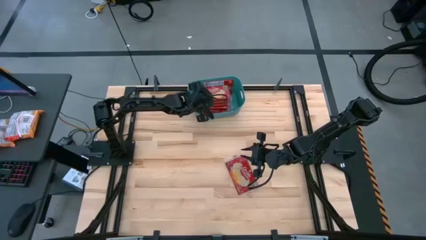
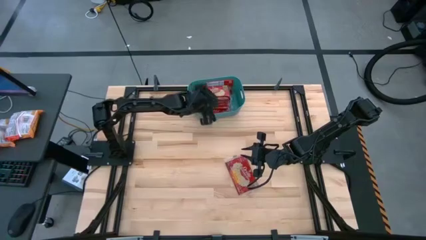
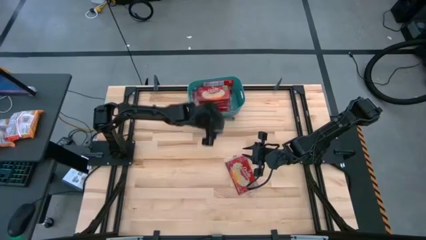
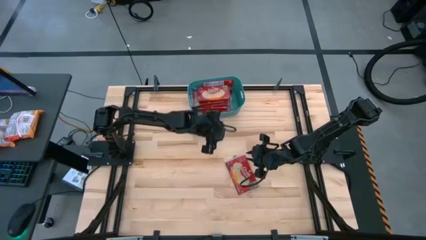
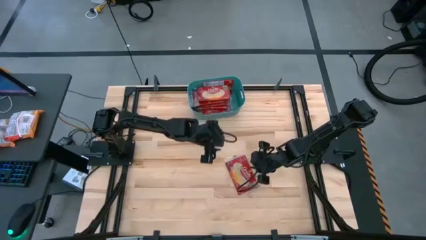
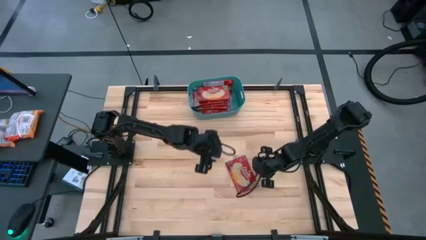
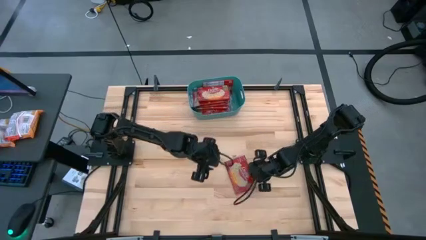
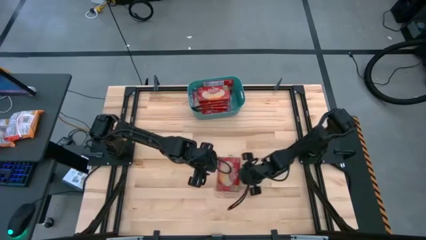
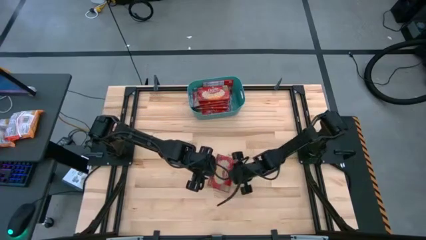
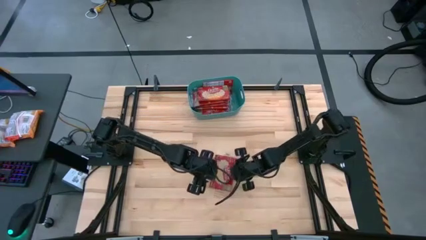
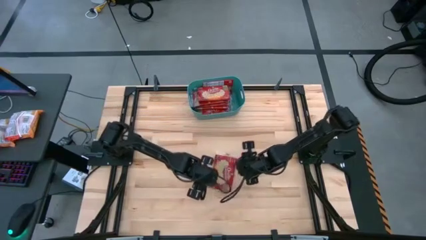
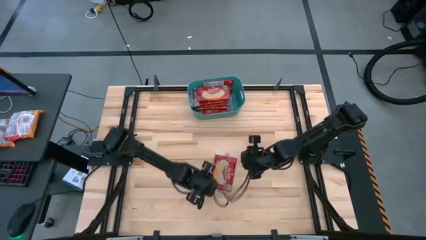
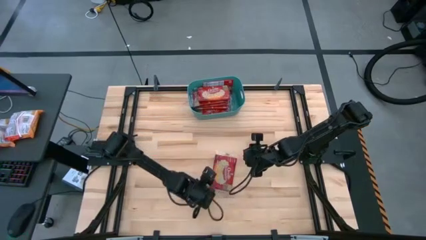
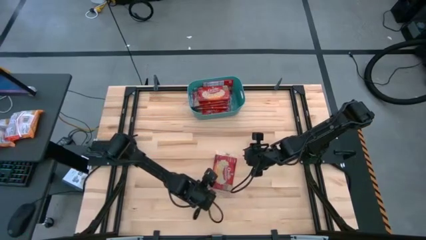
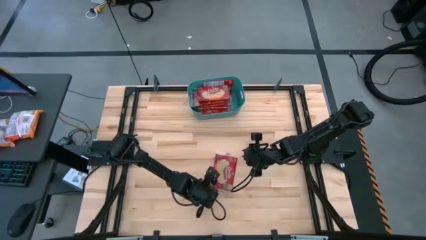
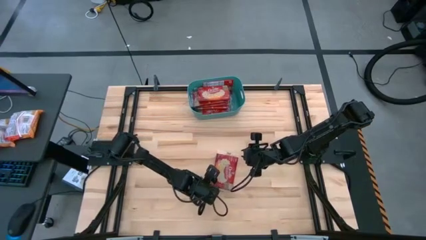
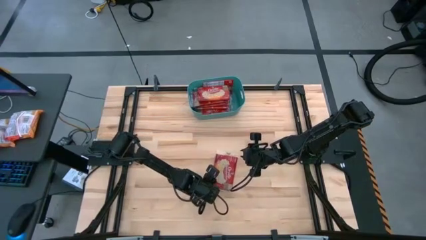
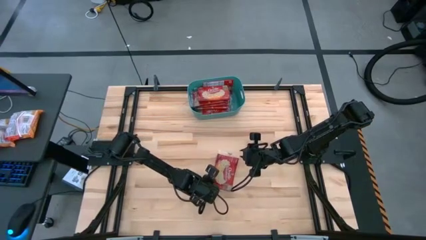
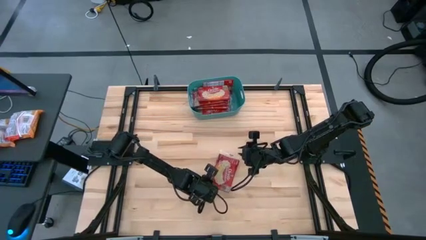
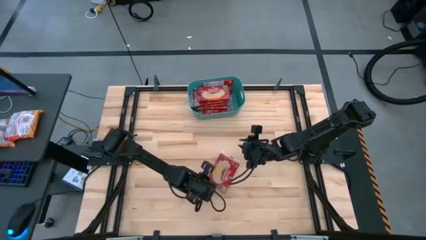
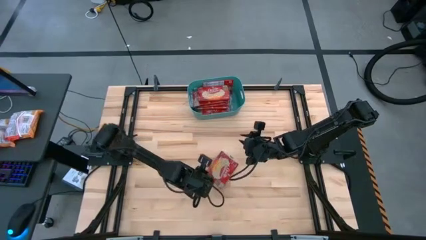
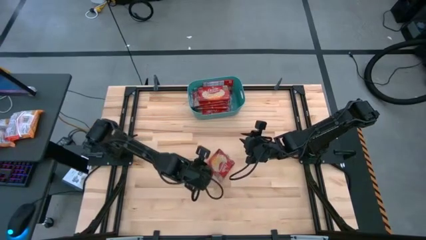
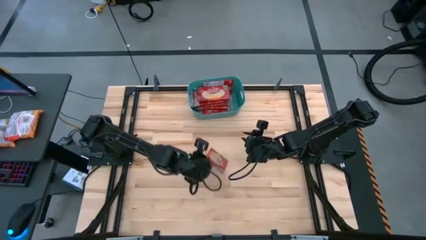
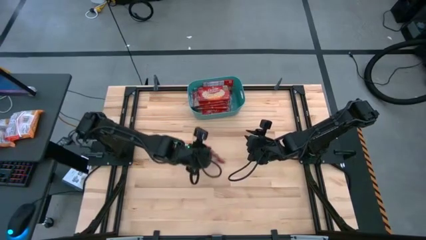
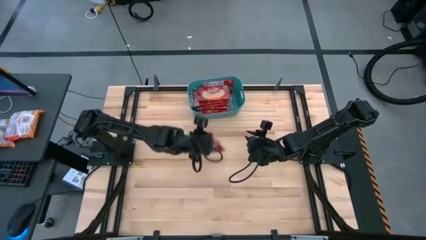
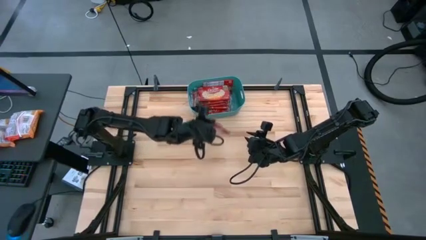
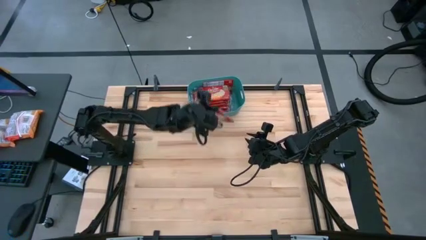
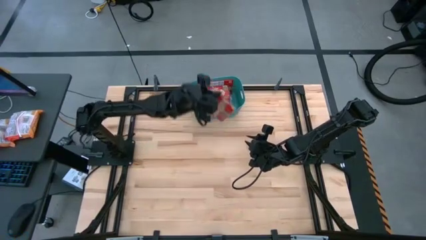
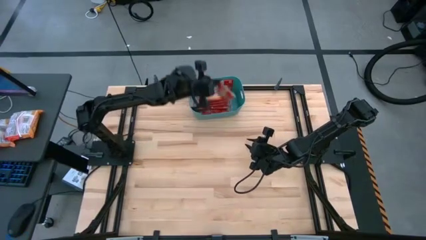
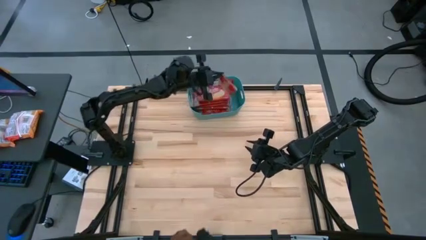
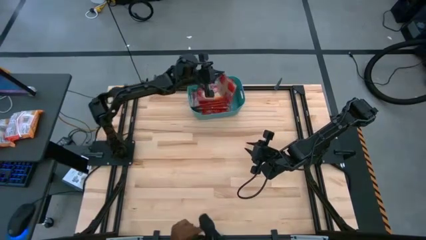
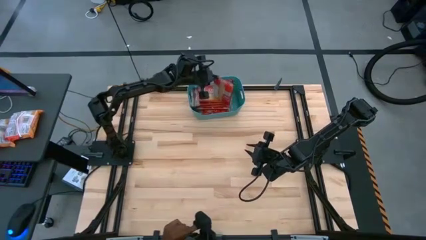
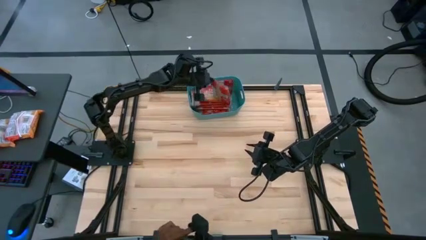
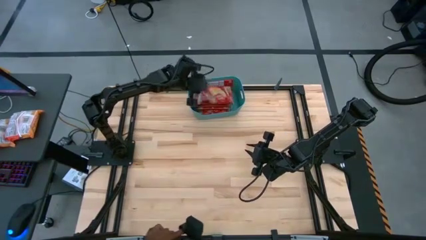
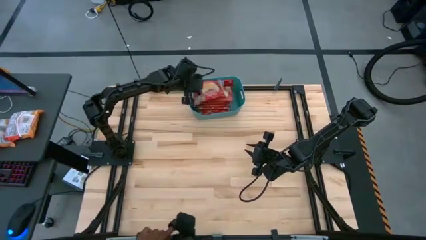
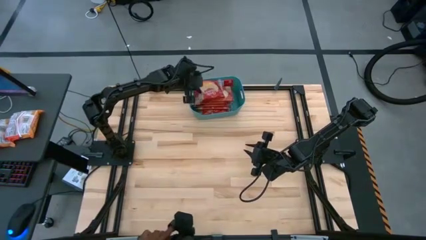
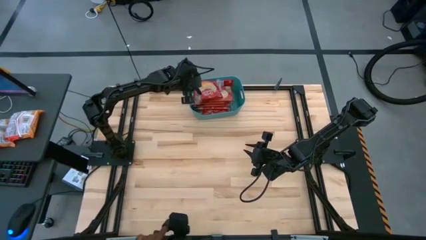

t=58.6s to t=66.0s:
Task: Sort popcorn bags into baskets
Put the red popcorn bag into the bin

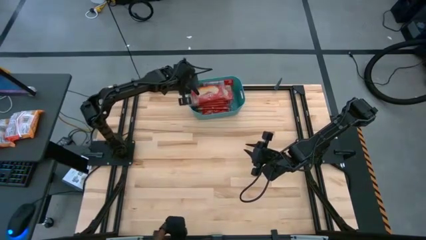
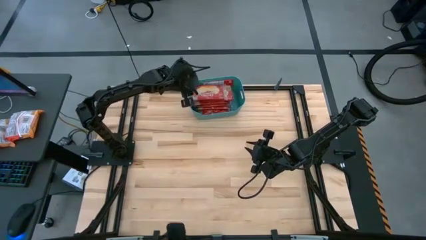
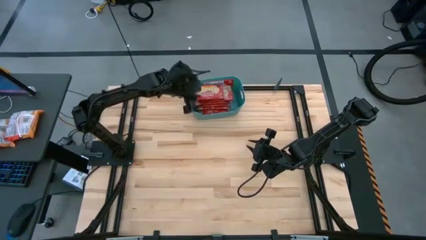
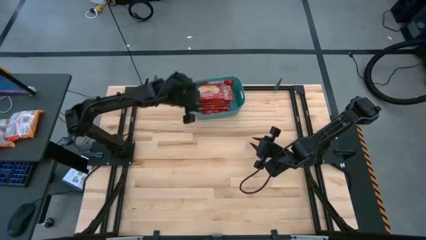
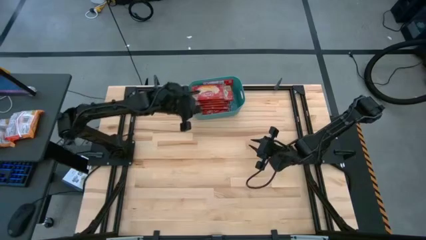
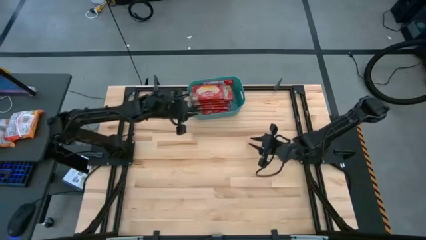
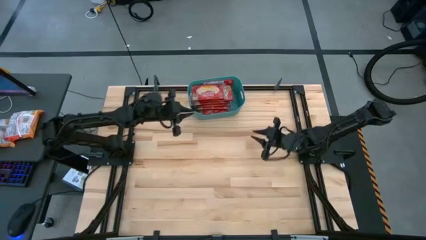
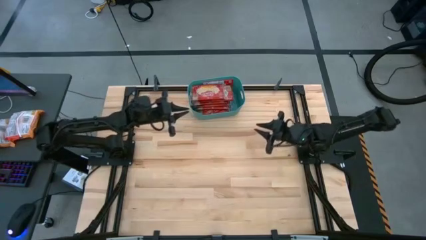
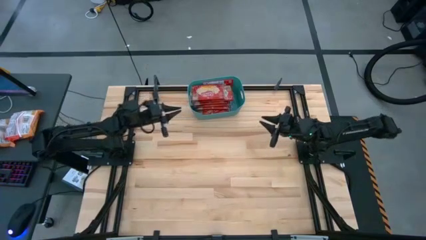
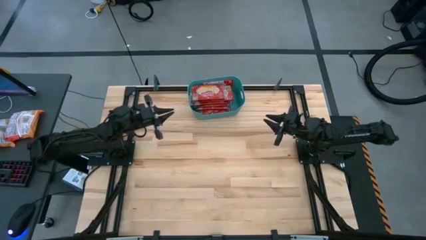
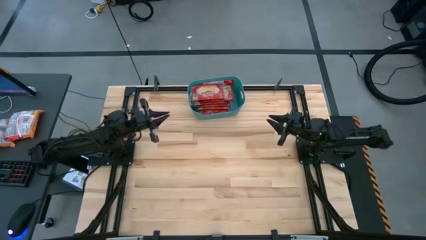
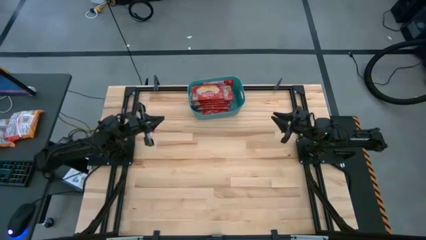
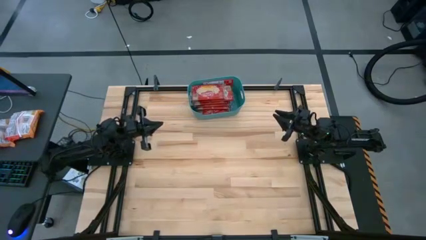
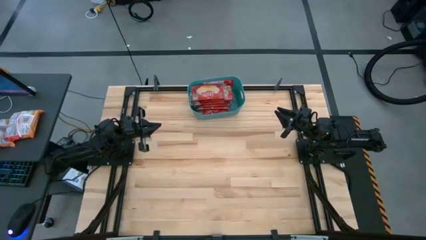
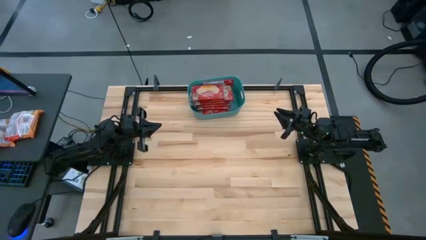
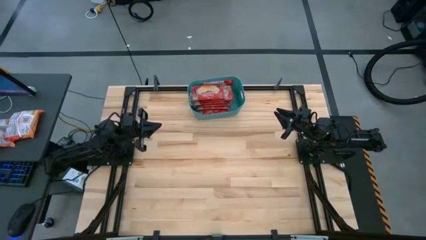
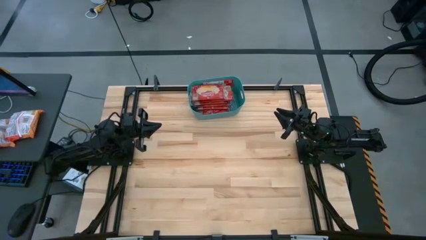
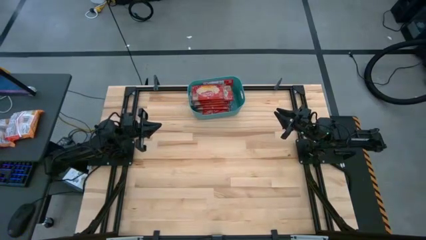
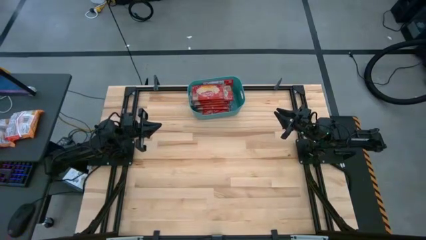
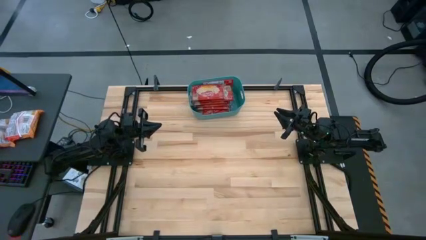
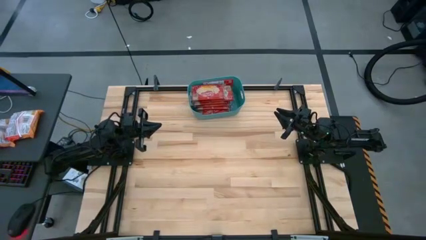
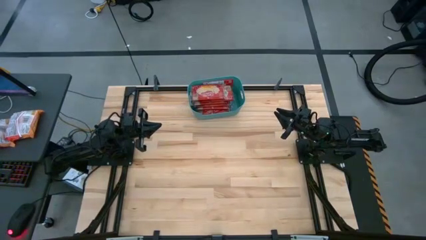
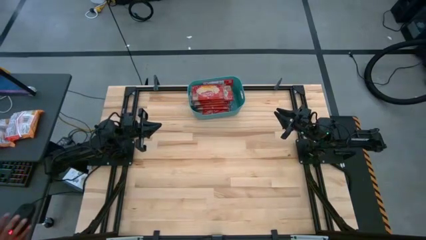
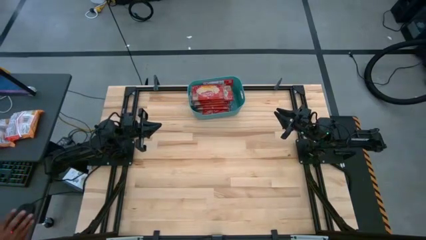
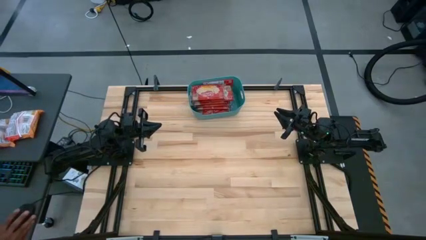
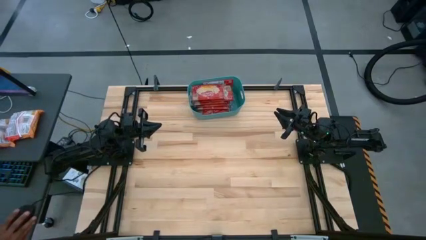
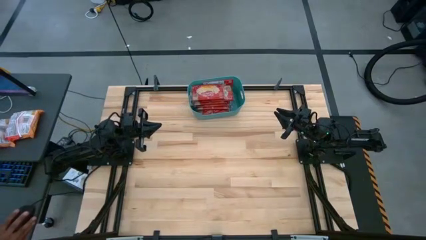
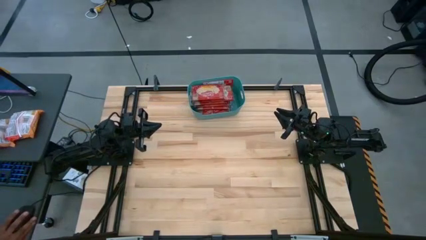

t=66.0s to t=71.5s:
Return to Home Position

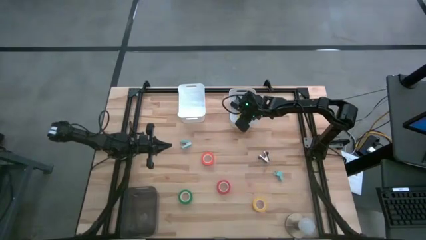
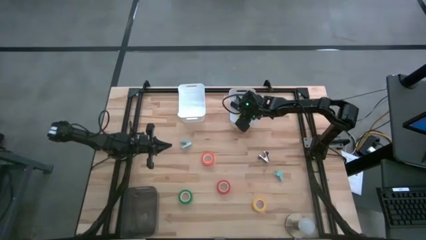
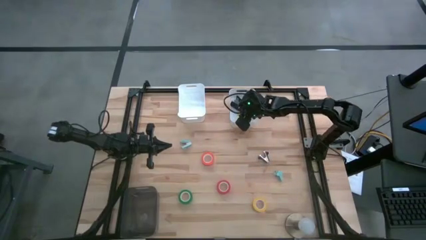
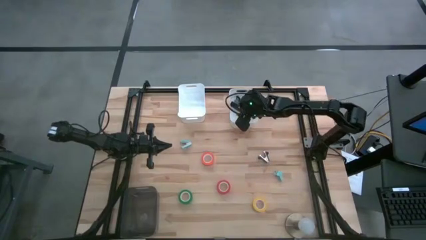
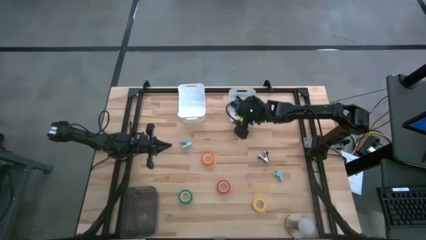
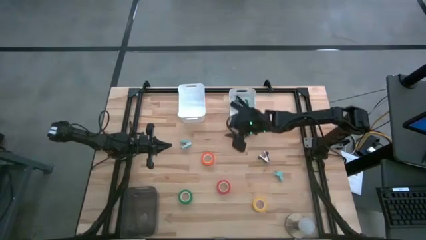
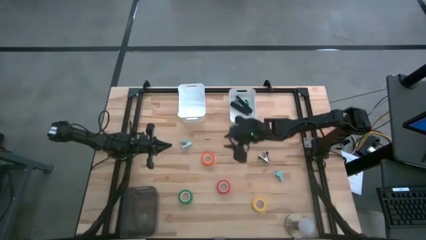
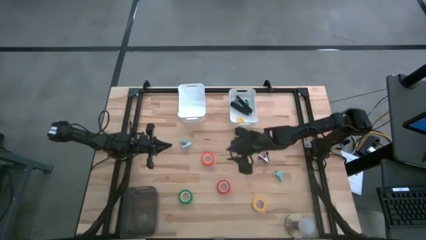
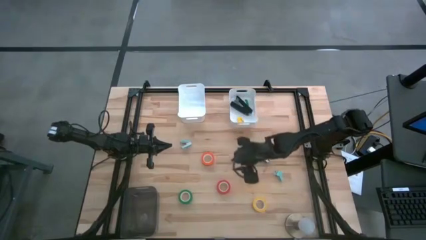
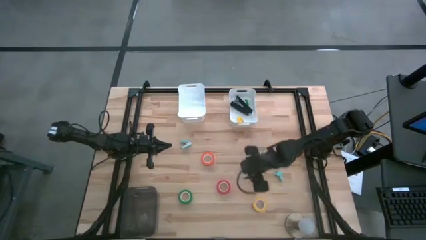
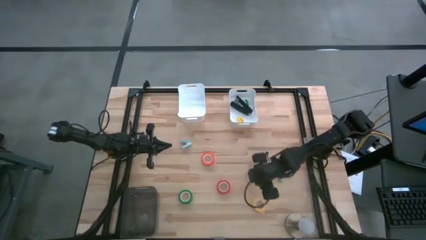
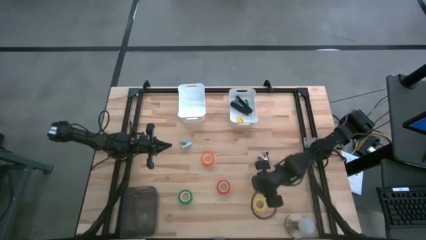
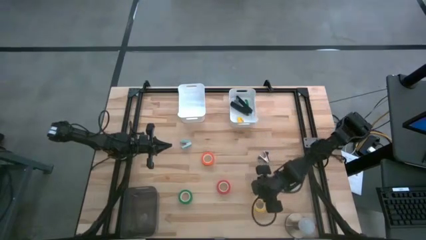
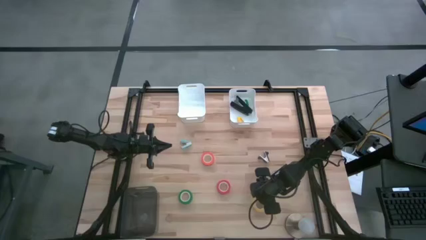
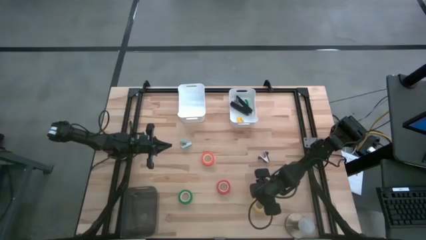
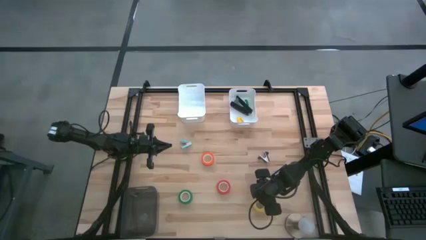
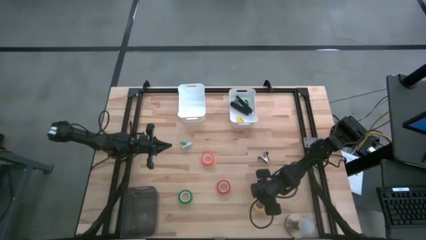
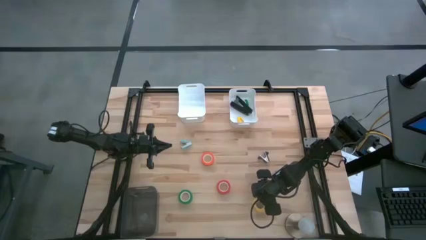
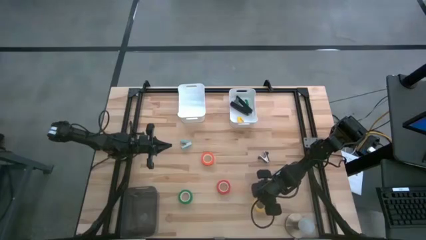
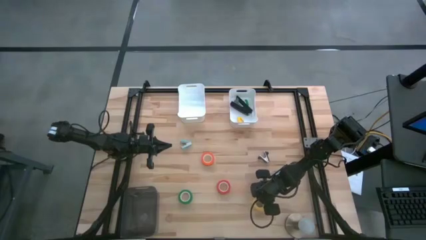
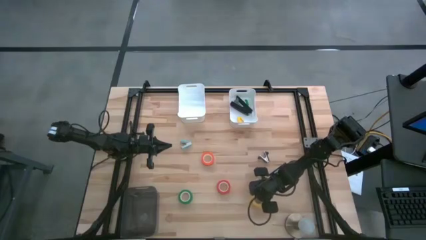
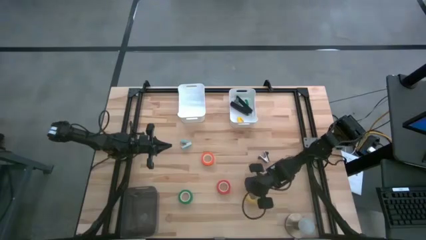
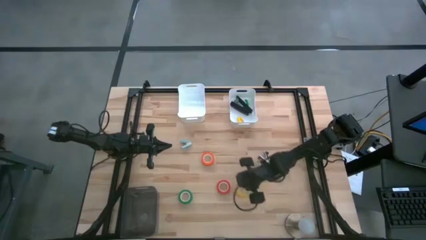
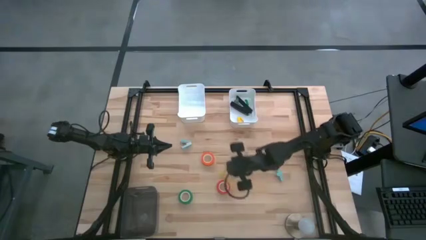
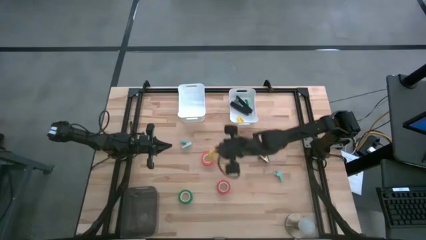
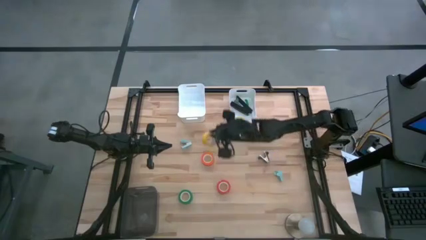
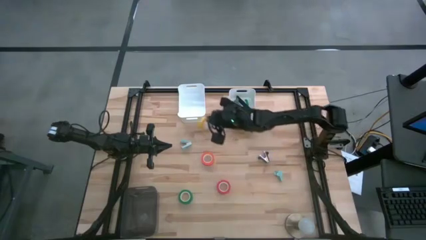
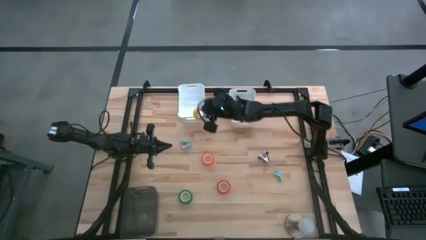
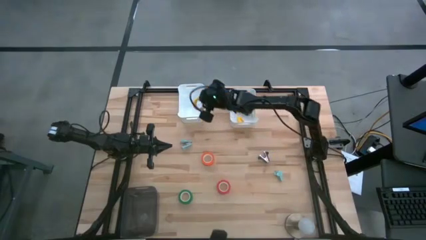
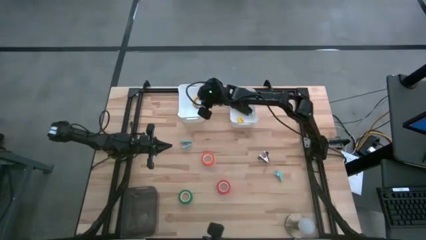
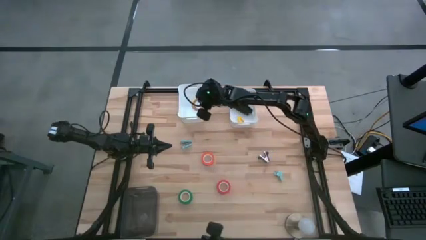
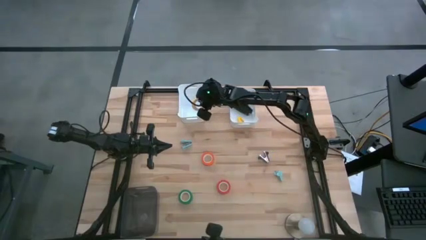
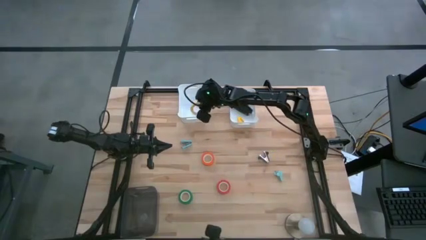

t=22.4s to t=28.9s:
Task: Pick and place Stapler, Stapler remover, tape
Put the yellow tape into the left white bin
